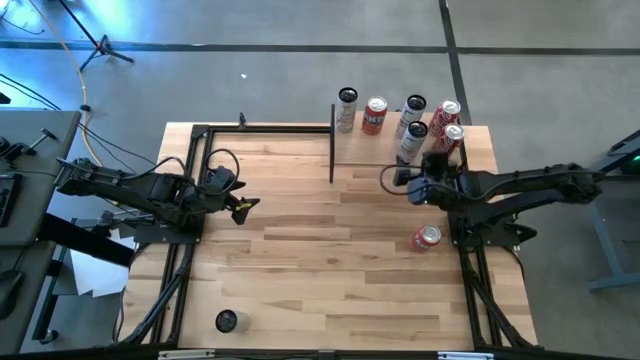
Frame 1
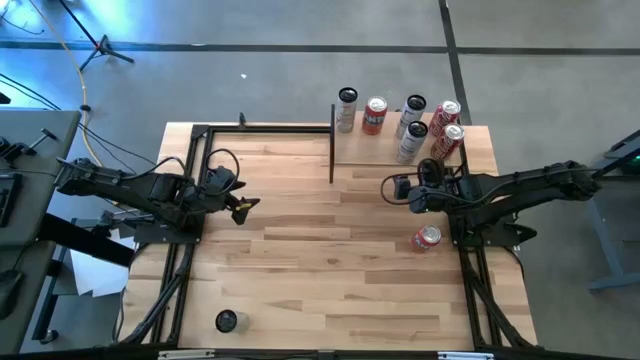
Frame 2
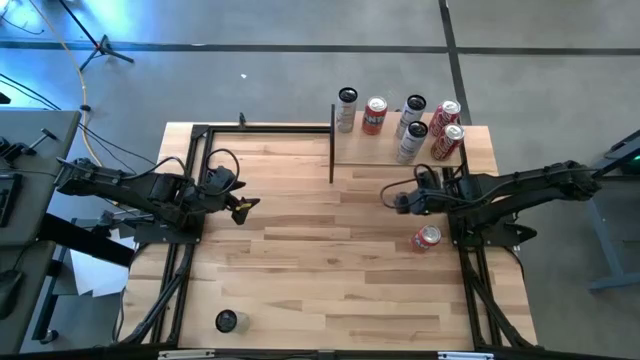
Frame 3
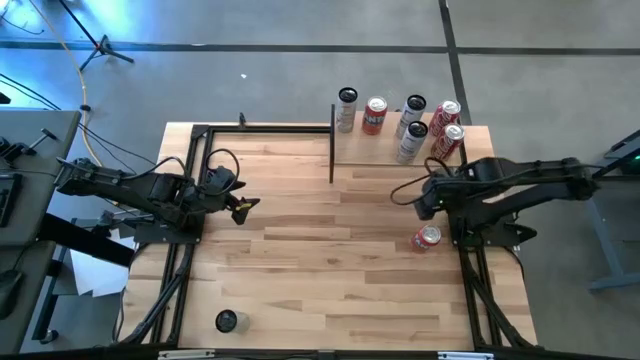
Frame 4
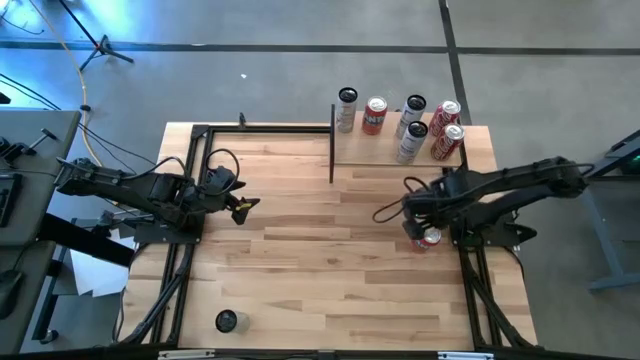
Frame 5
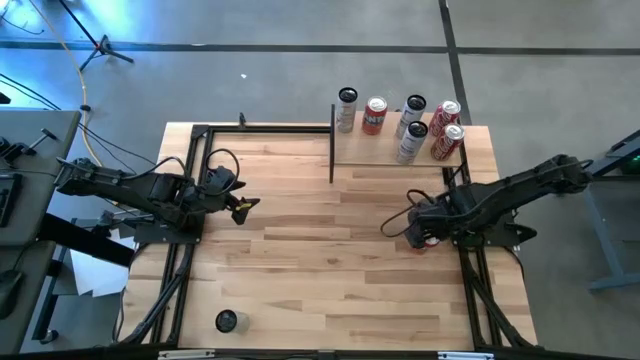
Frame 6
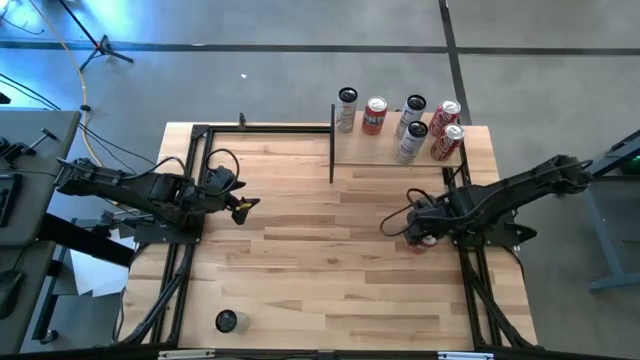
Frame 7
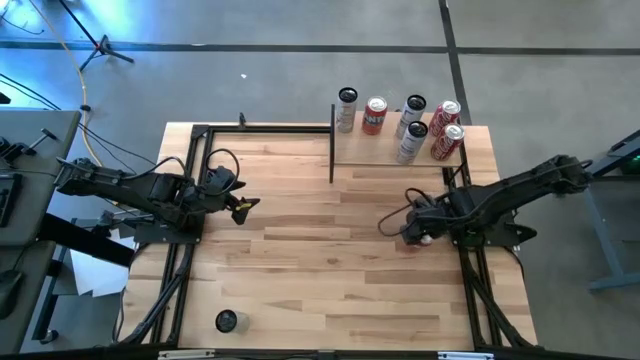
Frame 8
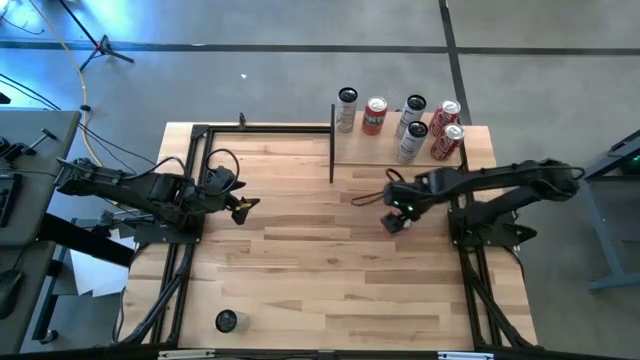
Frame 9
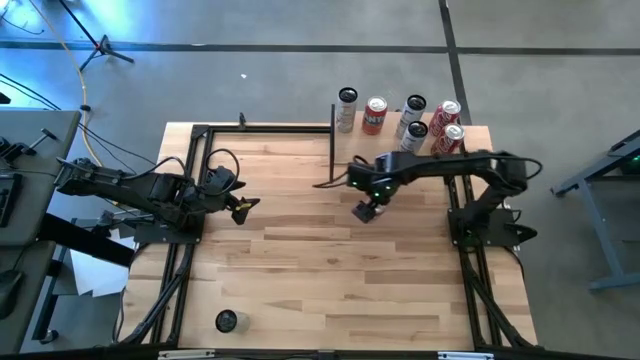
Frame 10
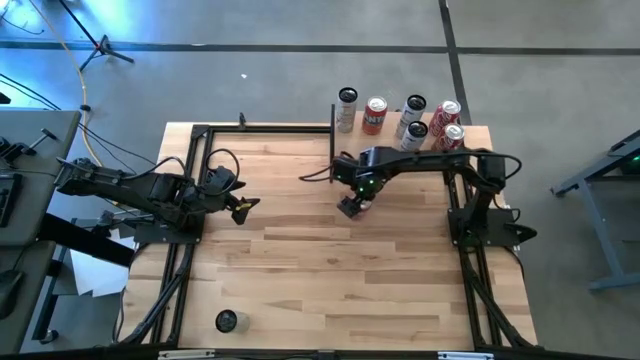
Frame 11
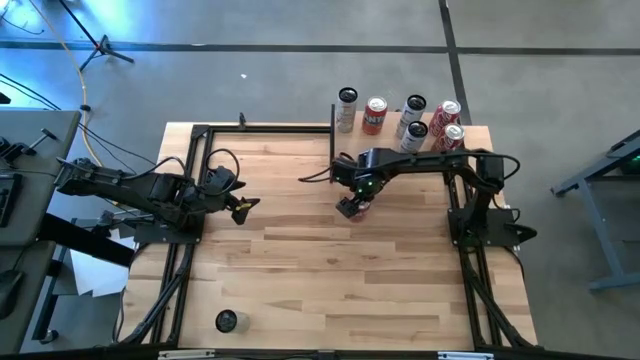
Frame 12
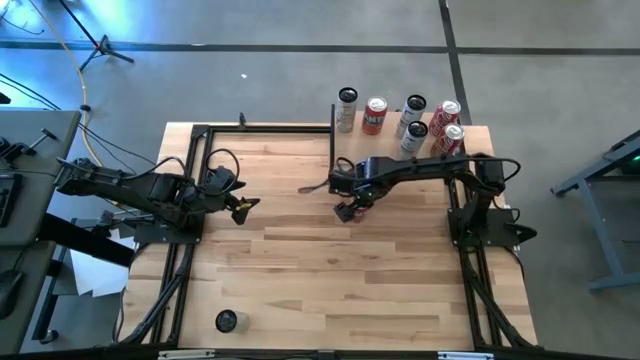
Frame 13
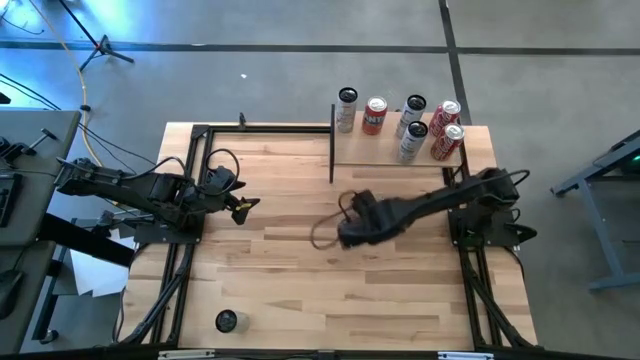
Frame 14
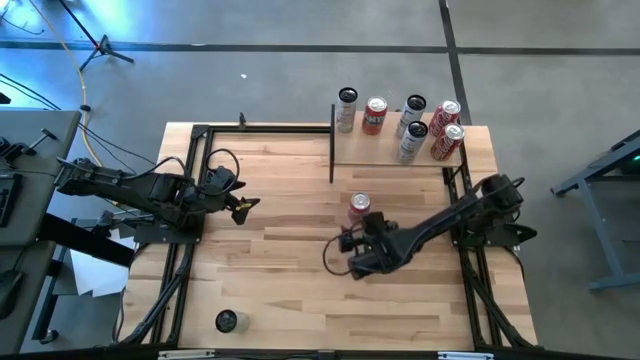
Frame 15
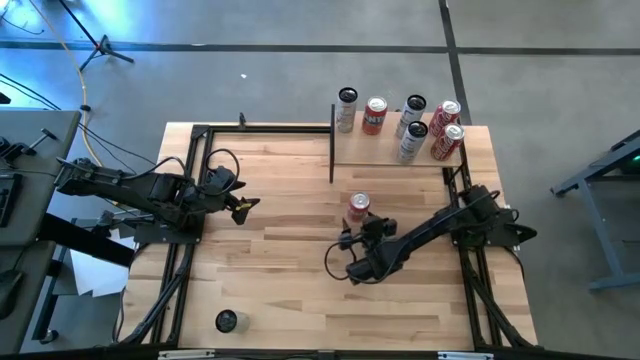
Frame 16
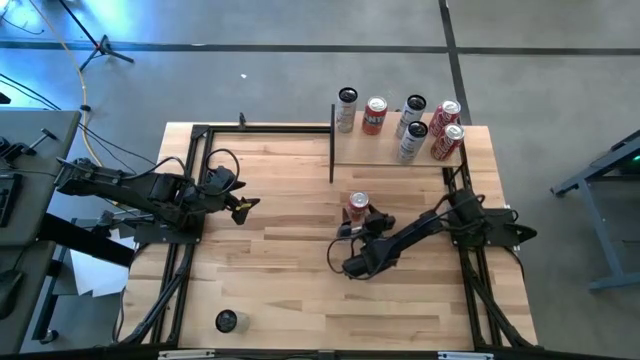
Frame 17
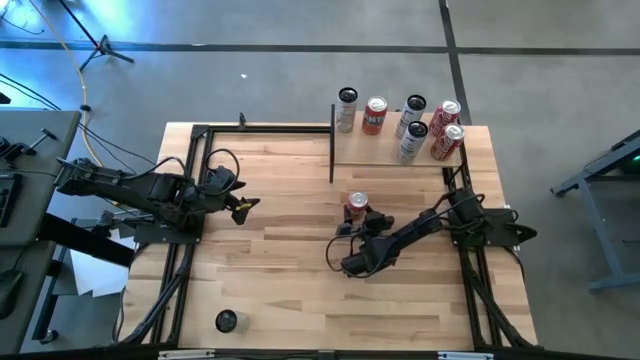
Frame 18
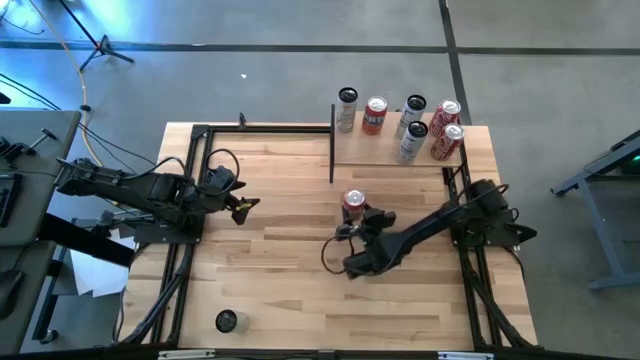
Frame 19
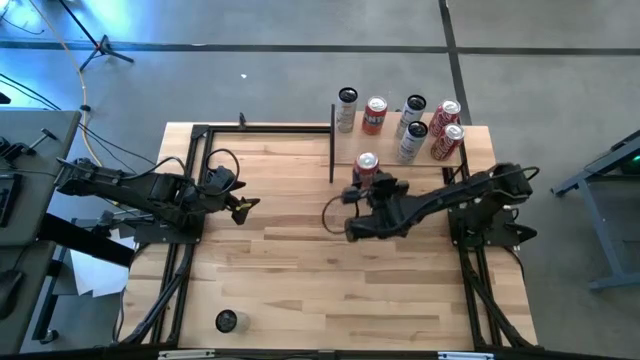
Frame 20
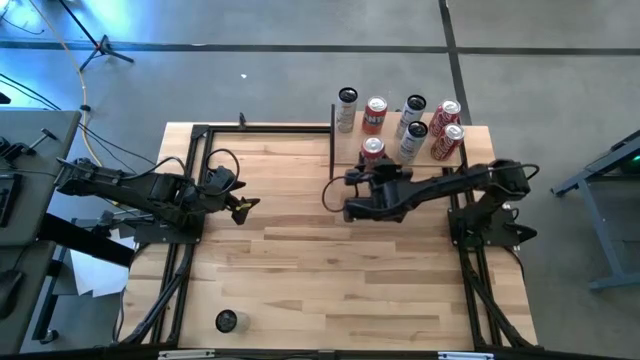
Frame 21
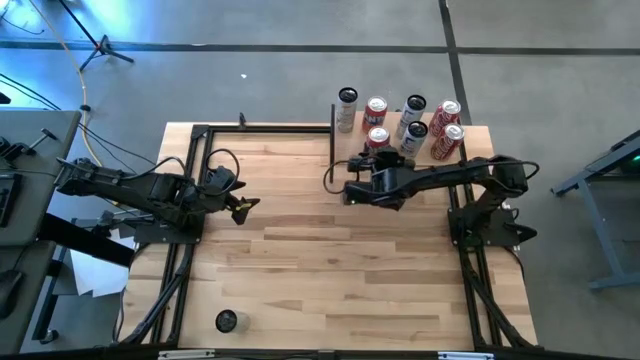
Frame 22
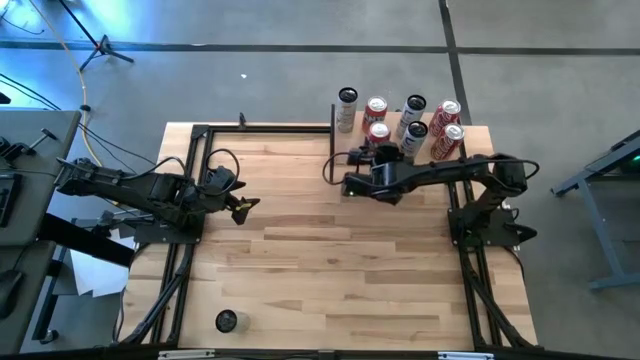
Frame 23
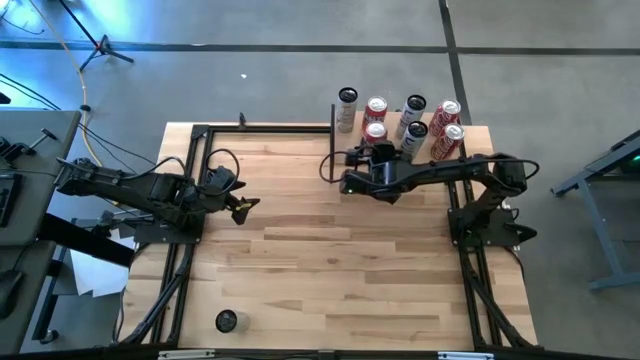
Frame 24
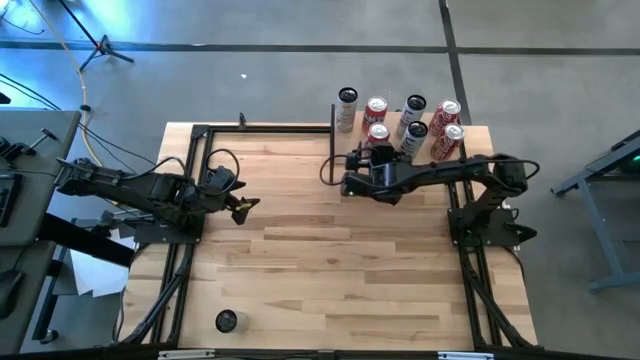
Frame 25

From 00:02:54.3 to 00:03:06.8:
Task: Place canned beverage on shelf
Put the red soda can on the shelf aligned with the other red soda can

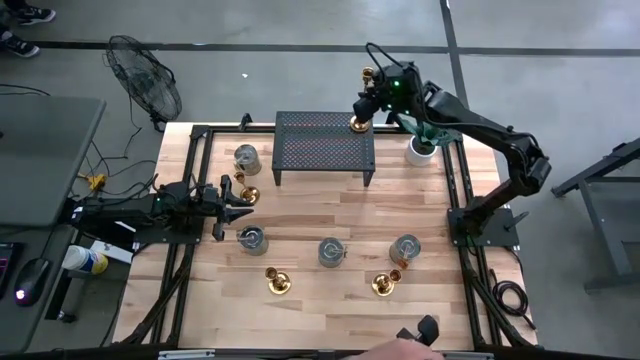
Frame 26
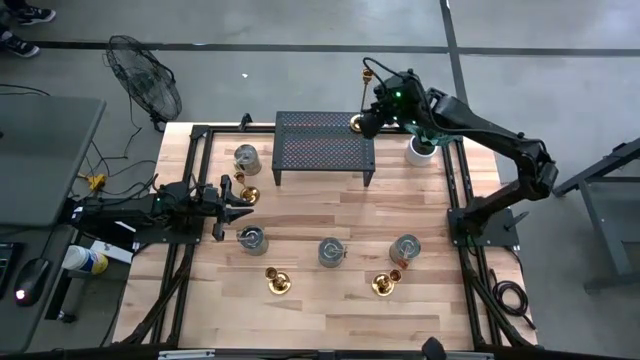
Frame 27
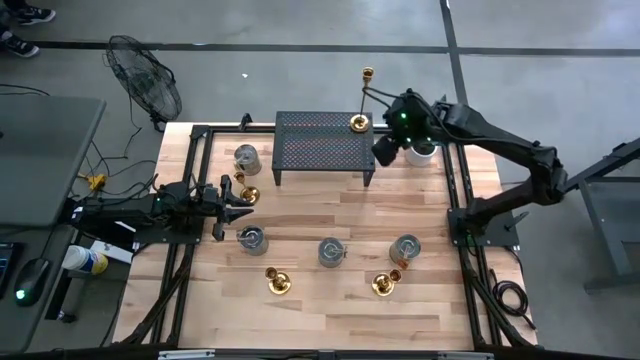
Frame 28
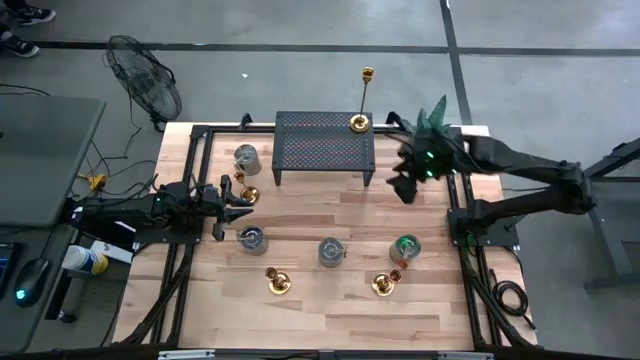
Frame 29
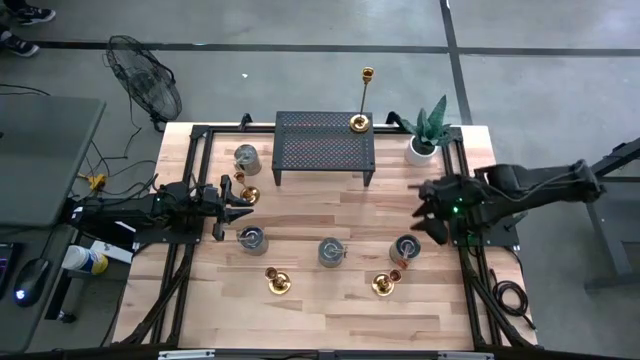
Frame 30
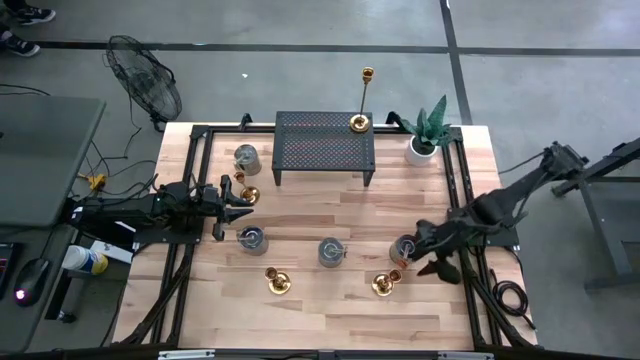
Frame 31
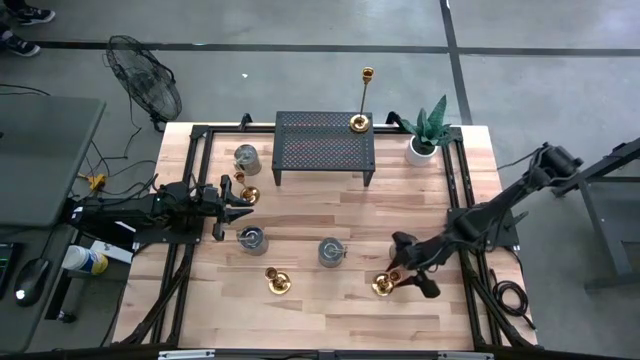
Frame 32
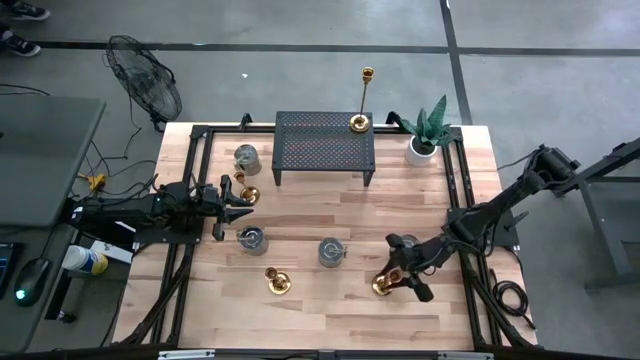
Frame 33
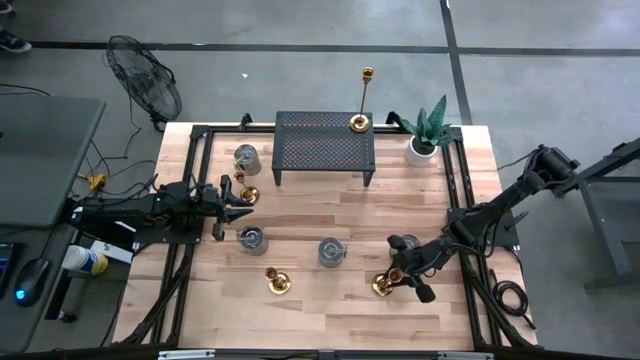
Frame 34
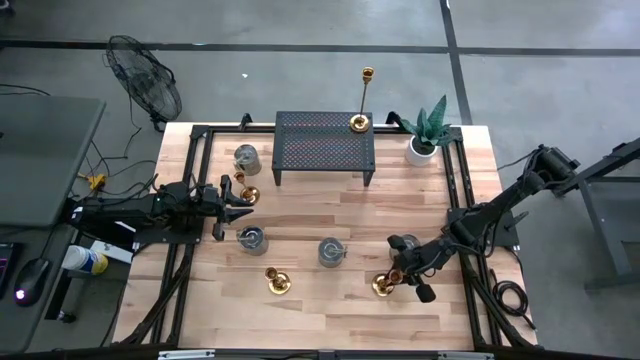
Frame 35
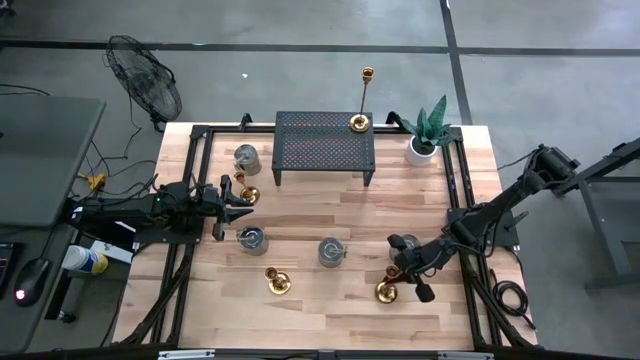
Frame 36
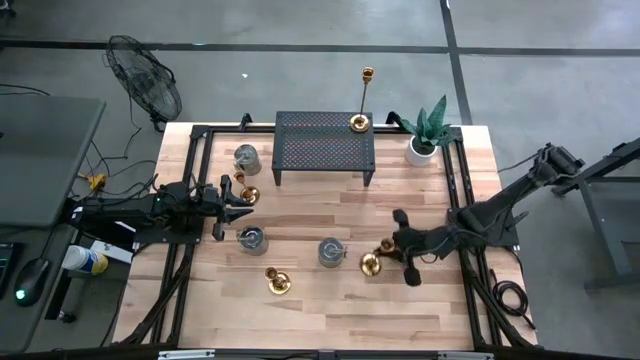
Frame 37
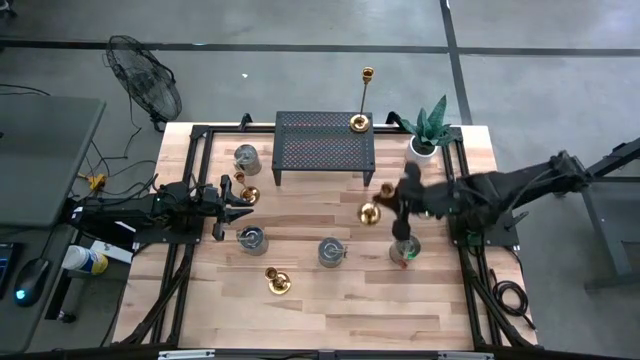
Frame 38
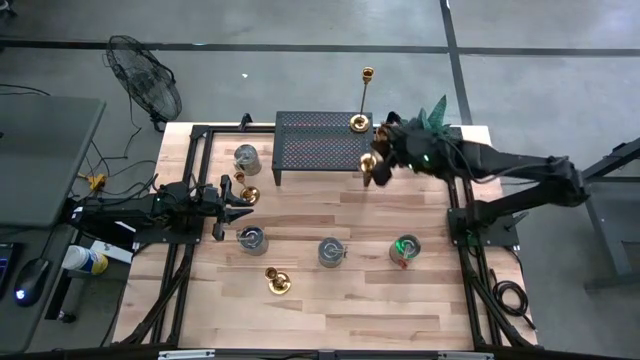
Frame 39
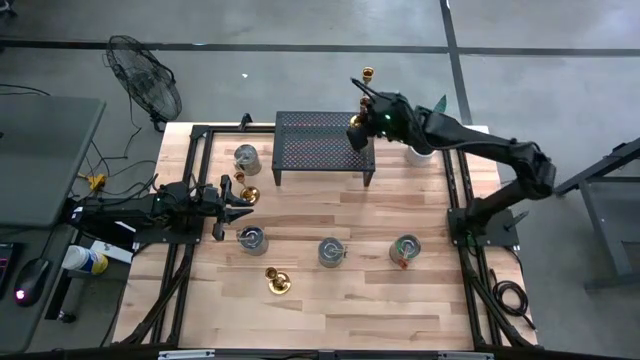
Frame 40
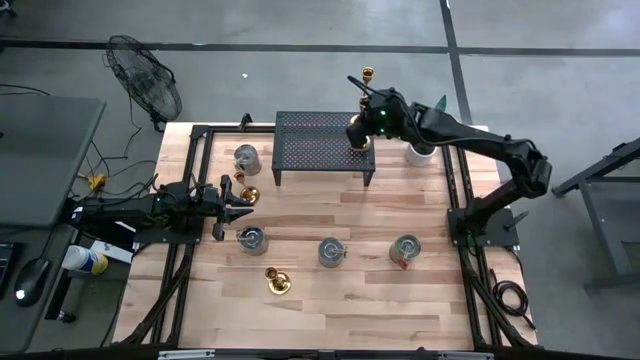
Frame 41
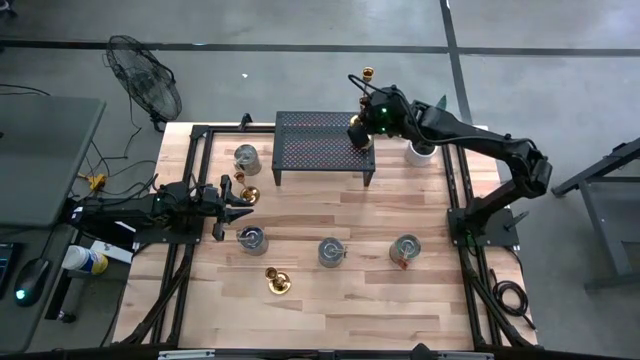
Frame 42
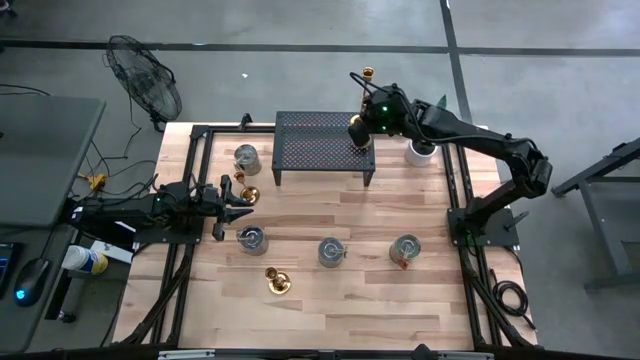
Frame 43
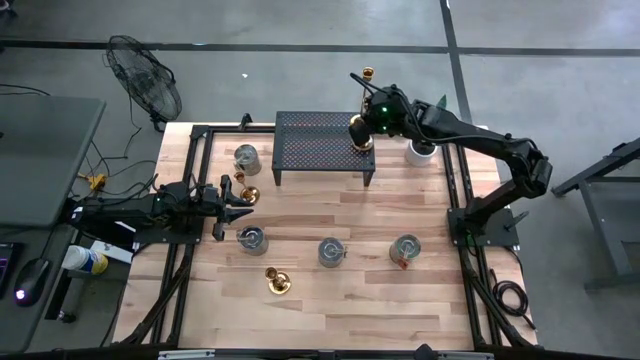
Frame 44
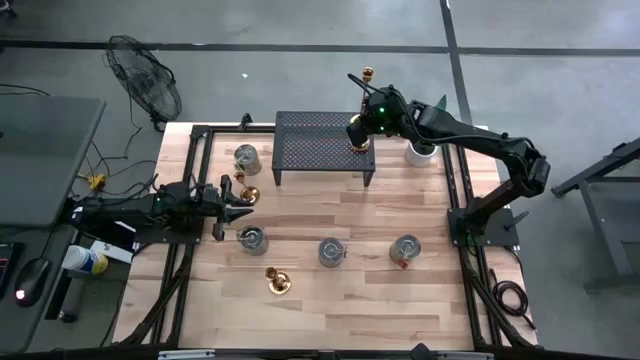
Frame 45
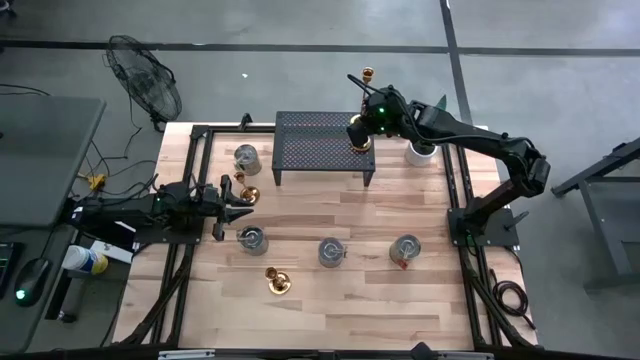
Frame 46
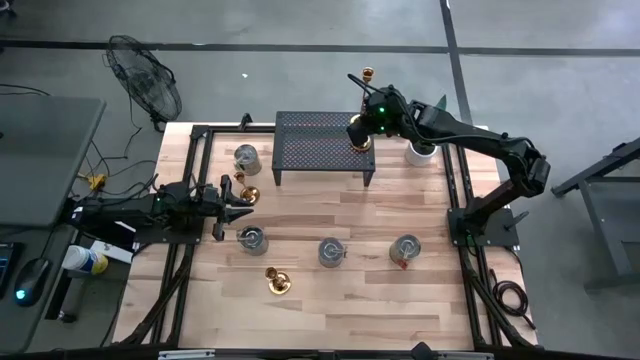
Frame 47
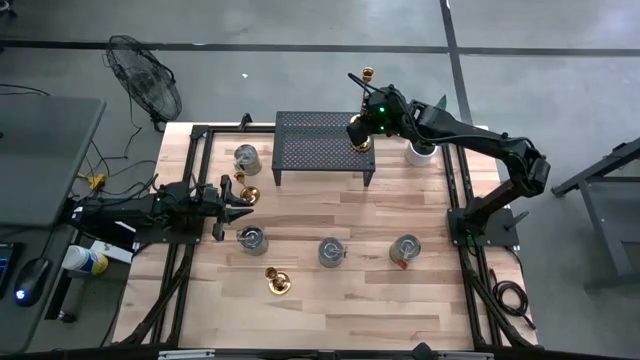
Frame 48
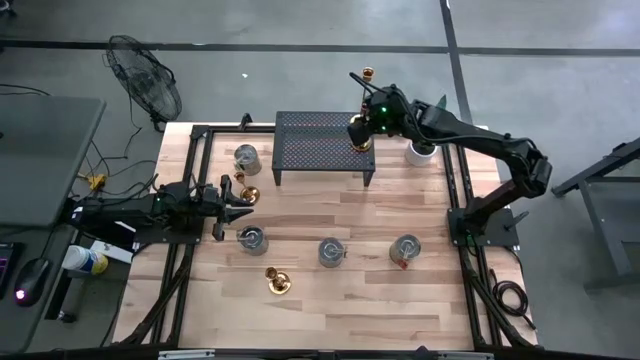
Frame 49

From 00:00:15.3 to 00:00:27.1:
Task: Pick & Place candle stick holders
Put the gold candle holder on the shelf
